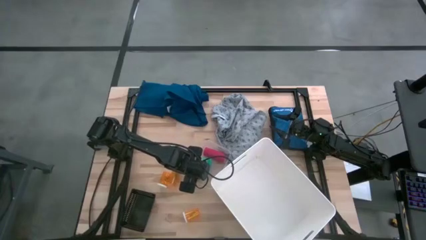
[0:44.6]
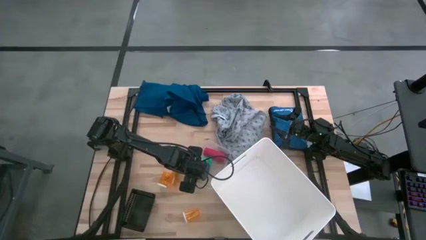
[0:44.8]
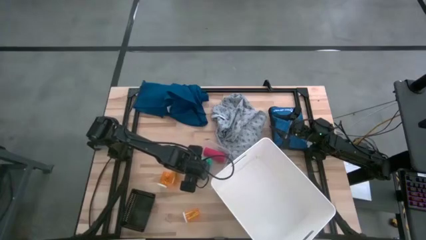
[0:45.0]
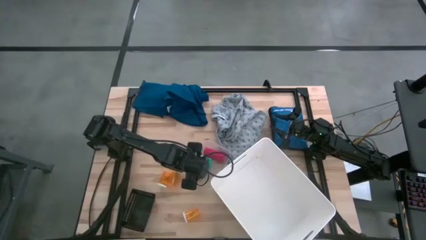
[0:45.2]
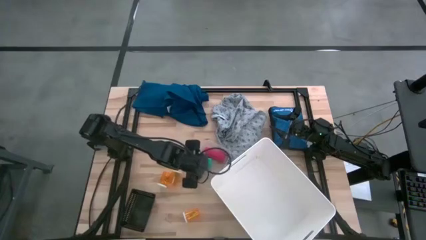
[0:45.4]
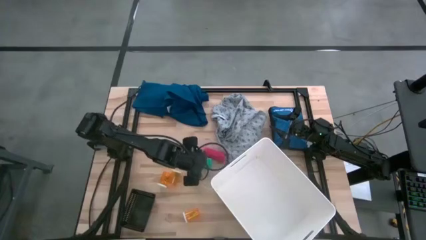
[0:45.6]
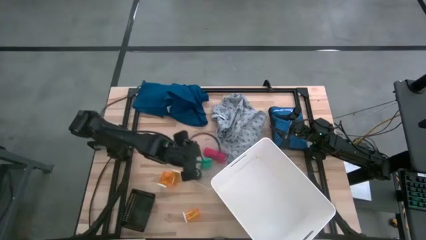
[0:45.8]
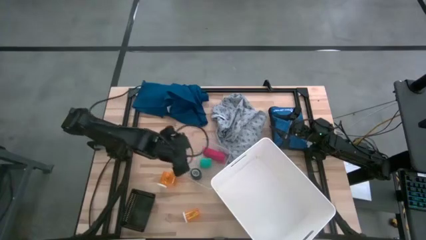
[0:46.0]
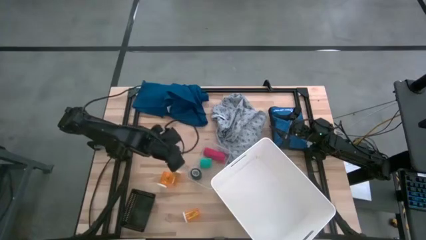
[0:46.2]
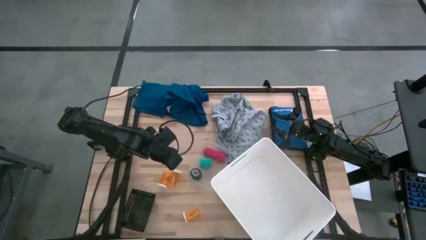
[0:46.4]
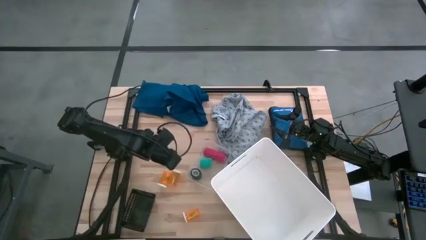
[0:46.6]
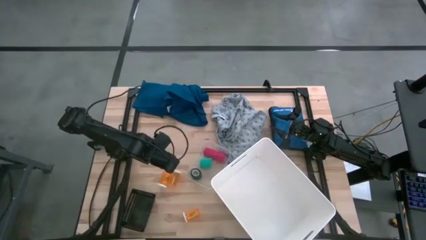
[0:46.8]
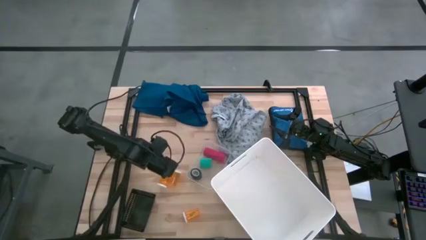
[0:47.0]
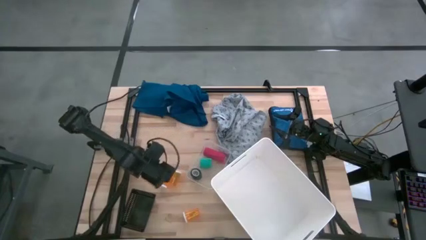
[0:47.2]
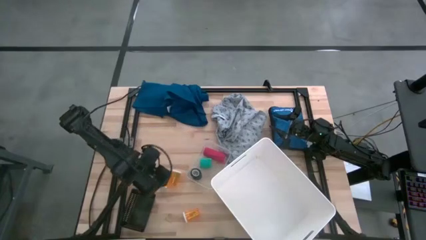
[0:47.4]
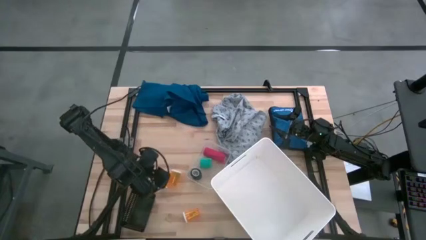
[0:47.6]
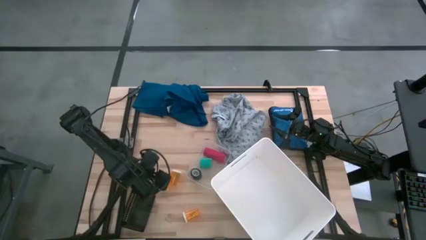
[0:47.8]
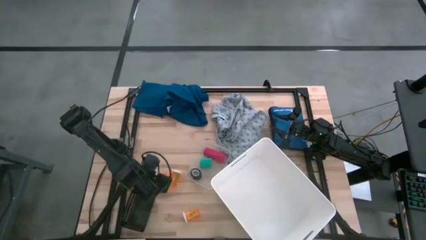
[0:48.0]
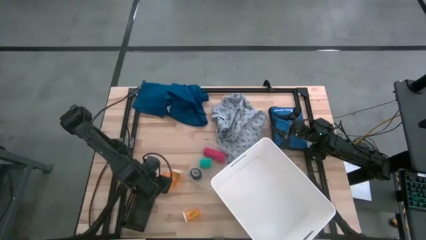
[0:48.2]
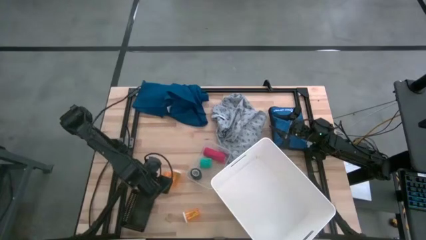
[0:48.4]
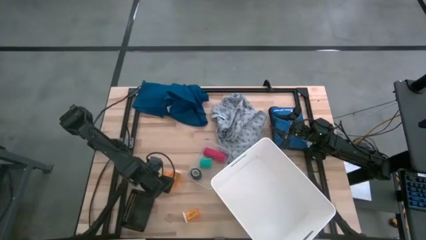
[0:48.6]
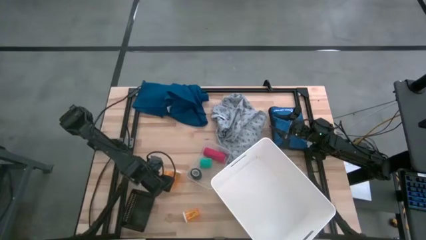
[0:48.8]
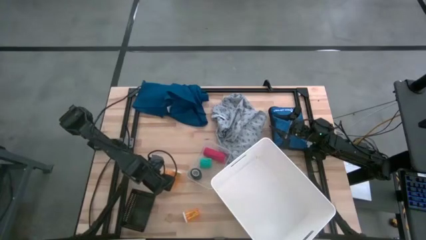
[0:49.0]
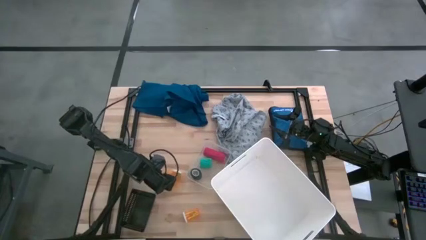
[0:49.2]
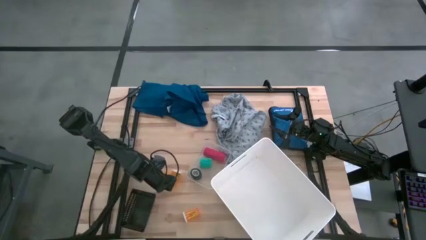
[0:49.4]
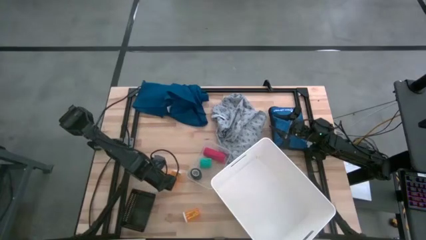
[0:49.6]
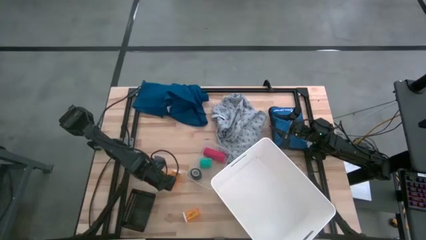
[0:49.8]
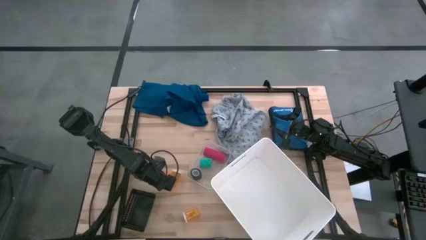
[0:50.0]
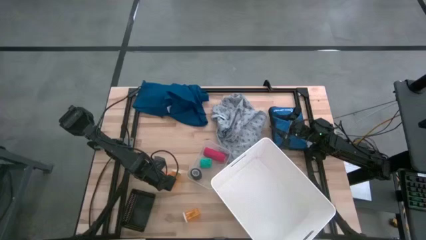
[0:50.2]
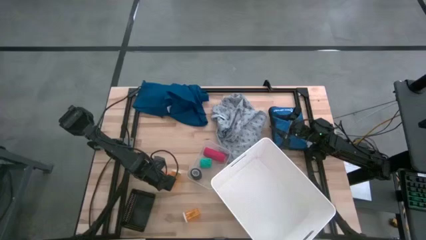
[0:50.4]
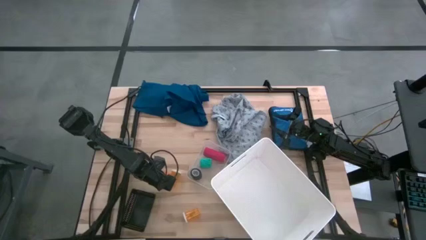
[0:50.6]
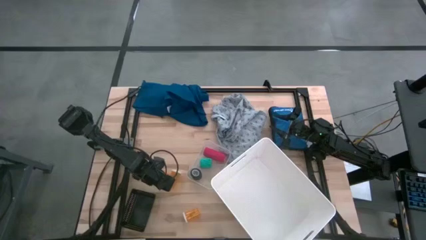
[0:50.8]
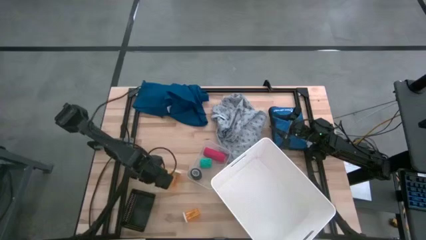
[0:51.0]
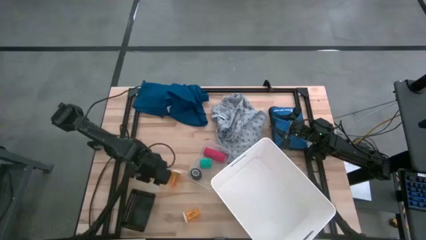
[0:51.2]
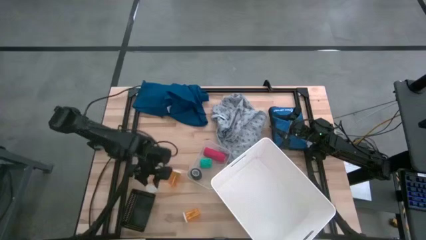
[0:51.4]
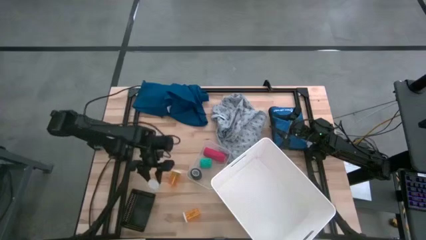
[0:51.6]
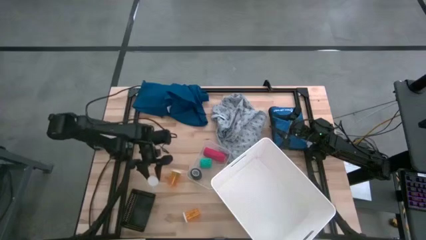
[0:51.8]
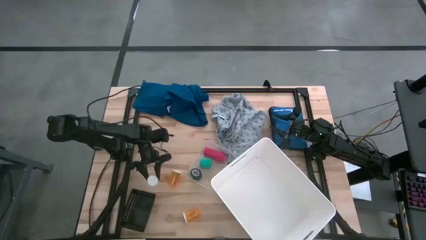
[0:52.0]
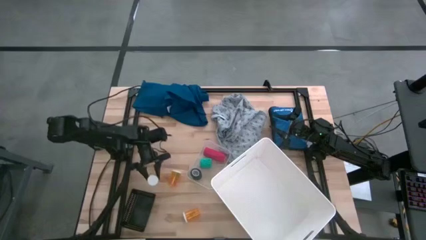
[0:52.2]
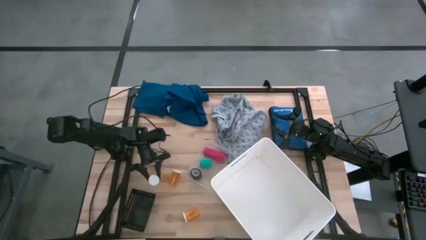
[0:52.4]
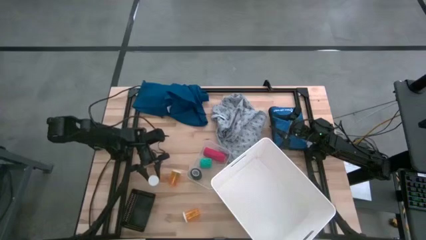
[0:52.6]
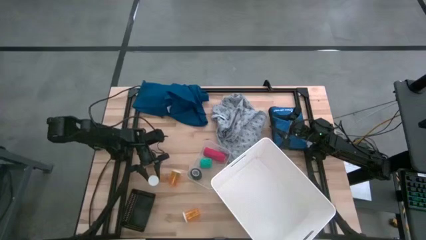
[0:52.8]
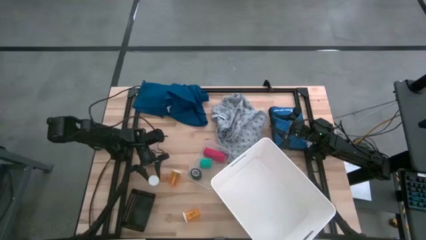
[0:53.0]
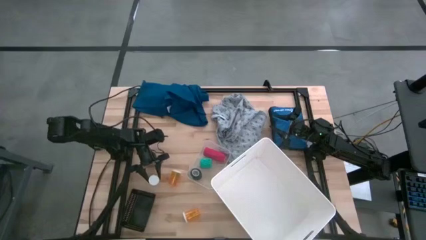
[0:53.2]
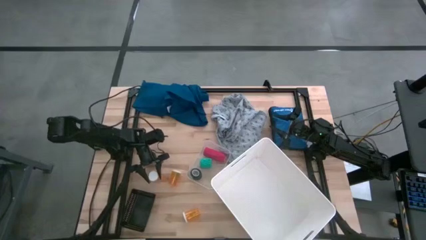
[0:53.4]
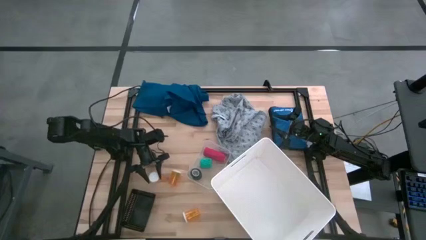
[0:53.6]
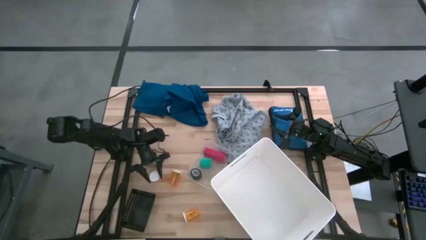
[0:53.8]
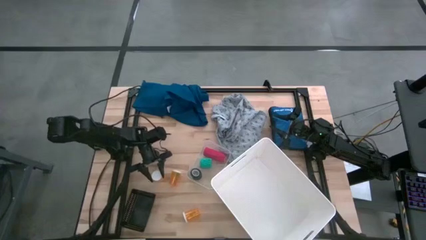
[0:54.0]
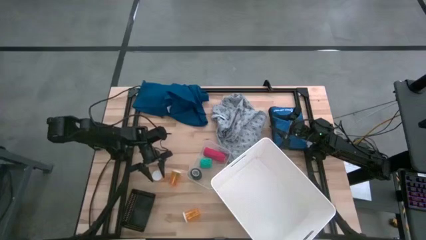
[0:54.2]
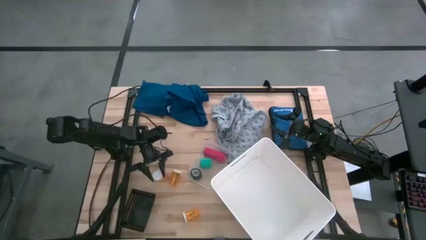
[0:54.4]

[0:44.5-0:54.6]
Task: Pick & Place Medicine items
Put the top left orange medicine bottle into the black bin

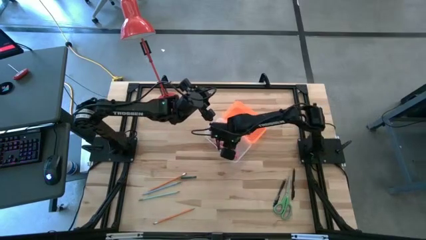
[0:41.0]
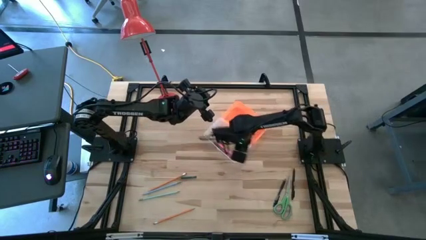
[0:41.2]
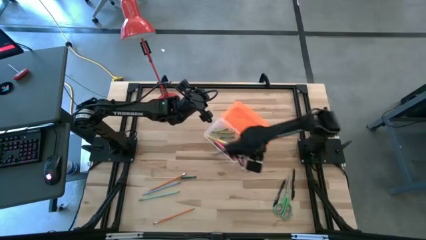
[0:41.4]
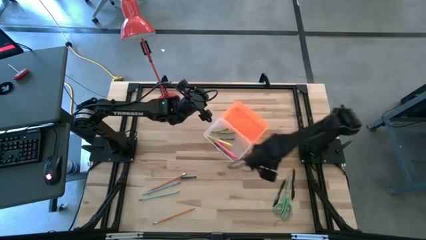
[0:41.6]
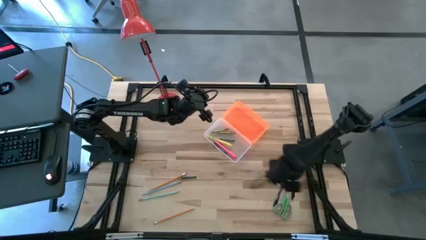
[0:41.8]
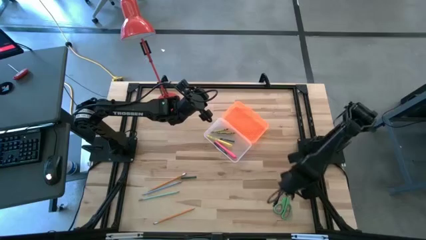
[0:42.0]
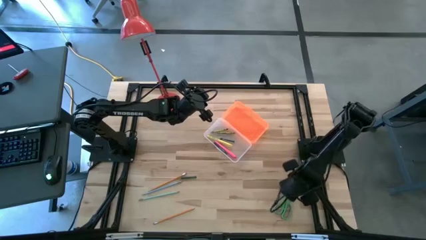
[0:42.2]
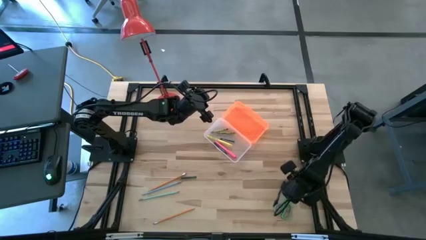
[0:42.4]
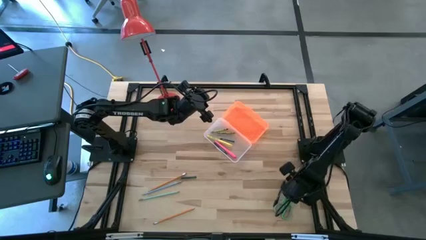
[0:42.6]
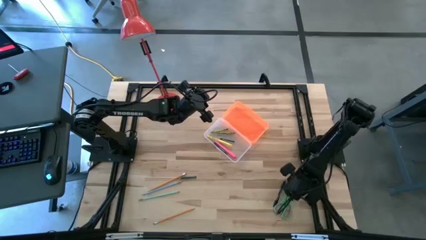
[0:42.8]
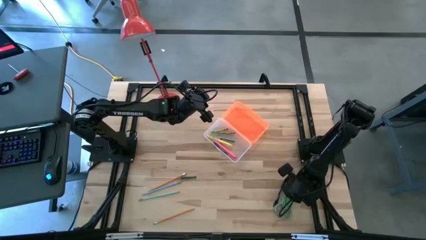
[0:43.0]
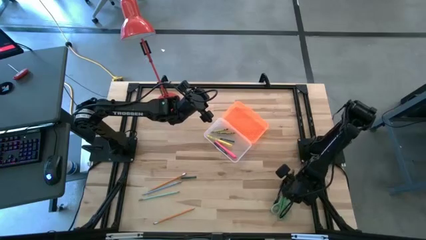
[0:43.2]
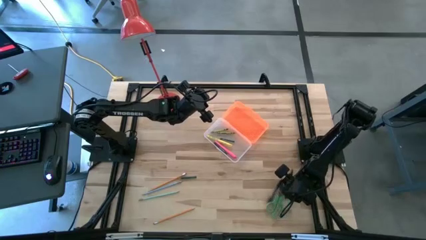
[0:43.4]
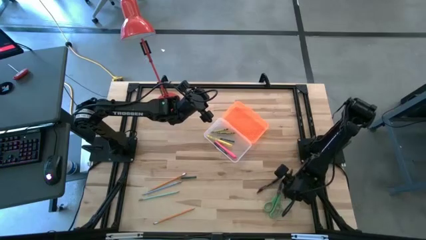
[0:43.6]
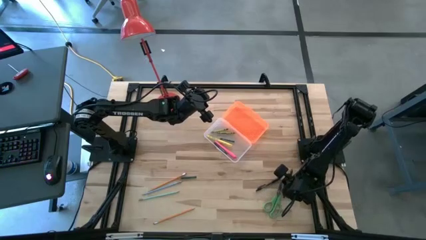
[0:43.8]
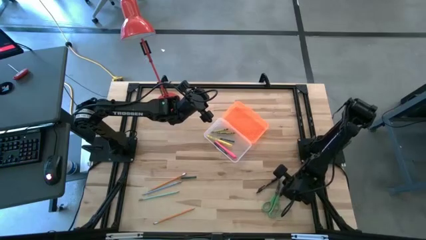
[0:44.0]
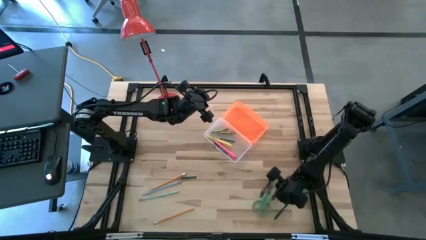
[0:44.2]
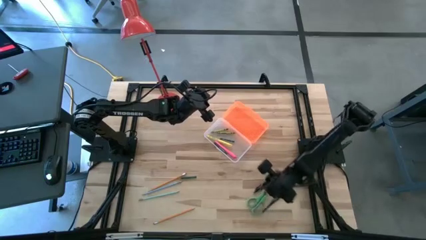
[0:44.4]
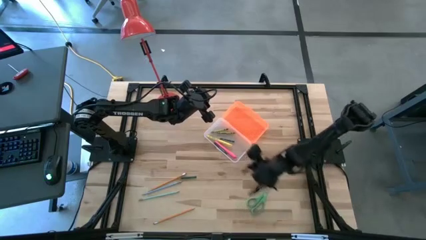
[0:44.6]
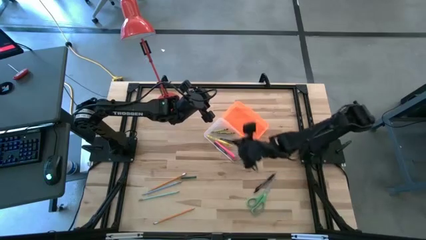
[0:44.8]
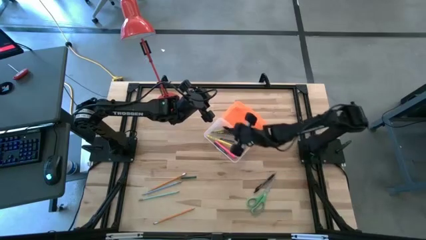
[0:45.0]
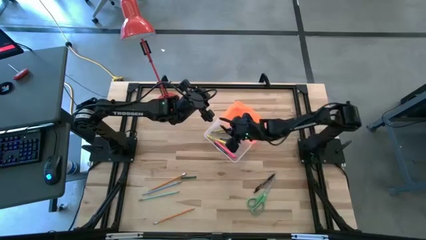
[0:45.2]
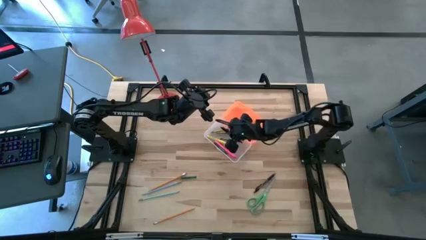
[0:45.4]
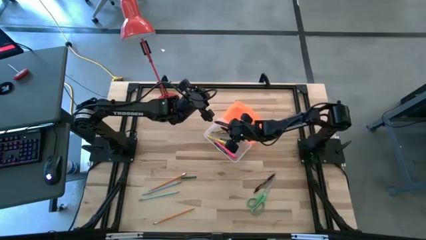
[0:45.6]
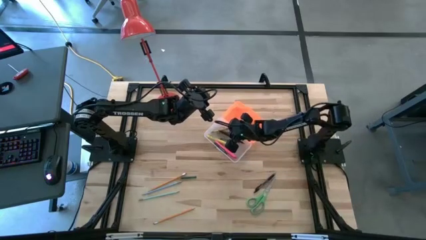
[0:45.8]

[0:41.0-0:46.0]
Task: Pick & place school supplies into a supply box
Put the right black pen into the supply box

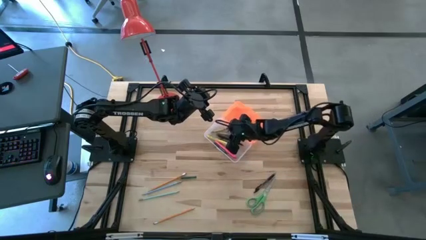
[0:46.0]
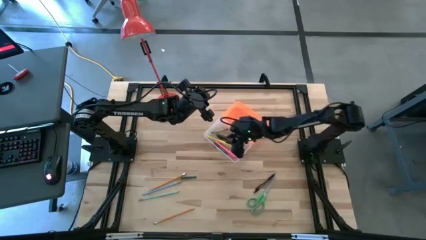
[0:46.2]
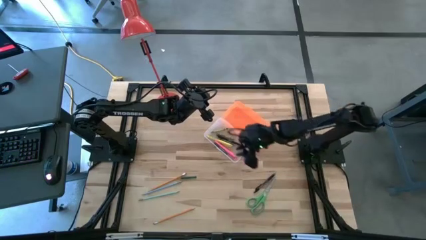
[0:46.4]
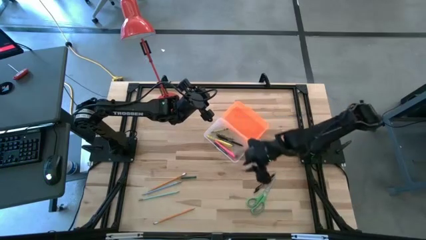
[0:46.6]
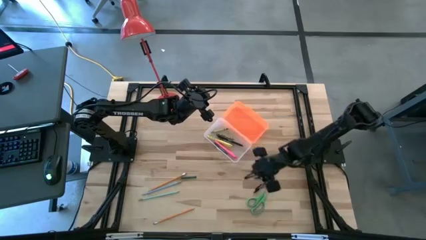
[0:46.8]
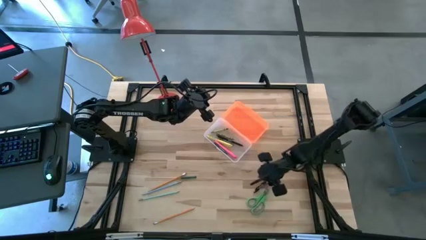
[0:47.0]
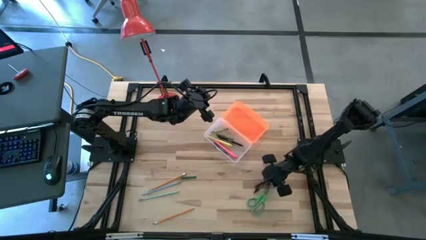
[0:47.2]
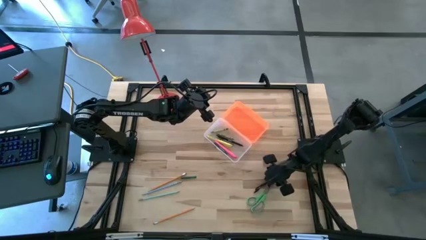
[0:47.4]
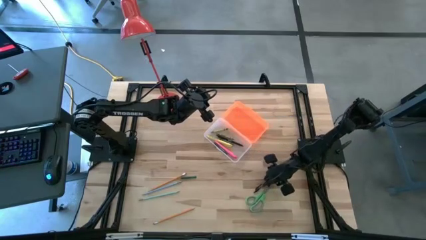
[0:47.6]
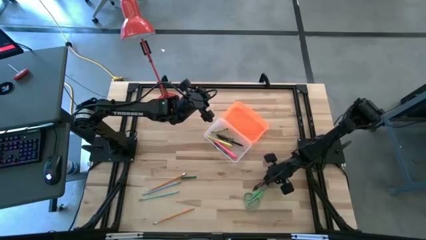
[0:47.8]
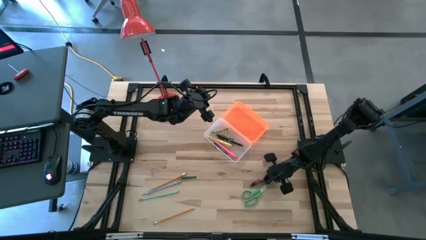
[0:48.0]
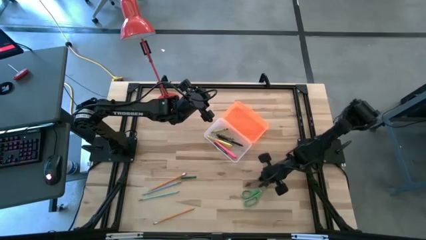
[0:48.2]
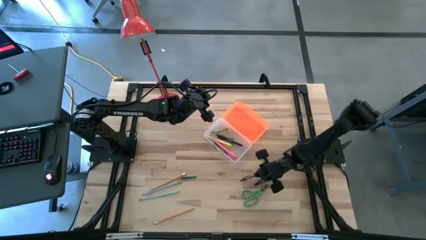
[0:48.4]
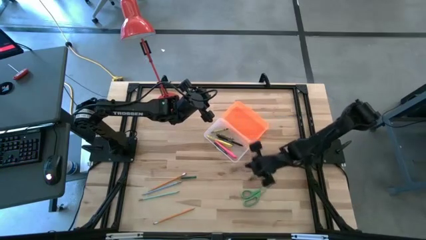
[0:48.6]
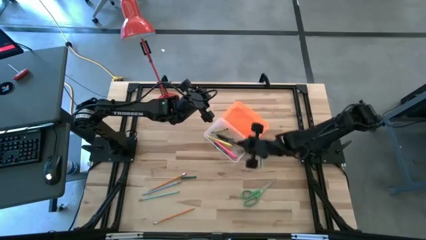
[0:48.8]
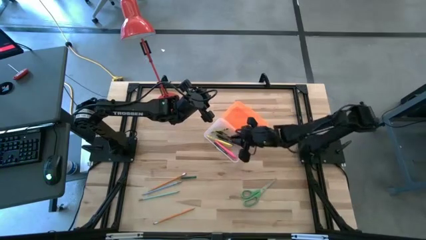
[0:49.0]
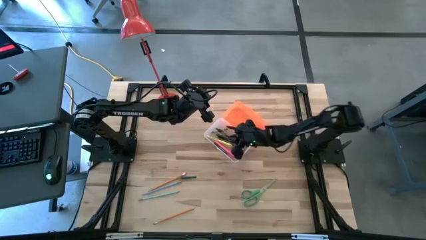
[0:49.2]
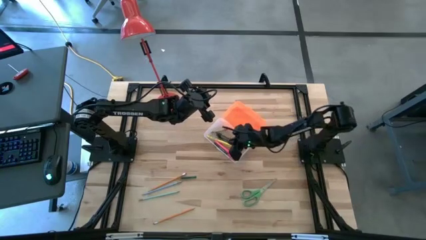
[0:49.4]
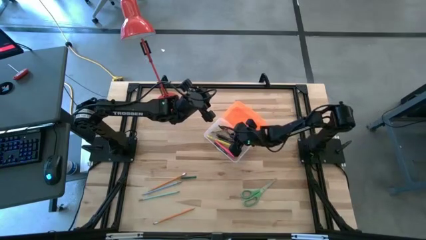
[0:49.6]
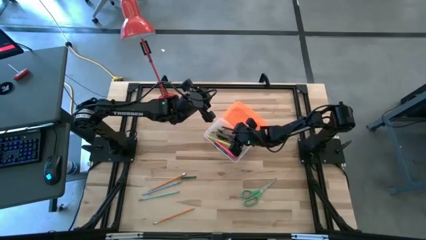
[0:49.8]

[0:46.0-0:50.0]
Put the black pen into the supply box
